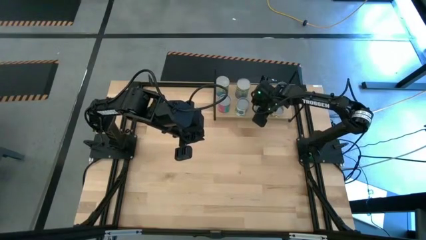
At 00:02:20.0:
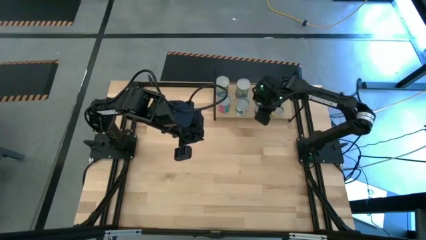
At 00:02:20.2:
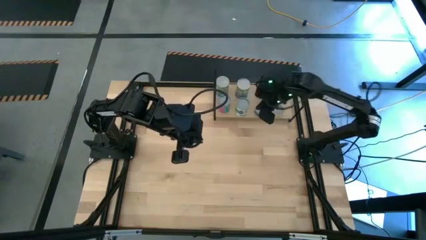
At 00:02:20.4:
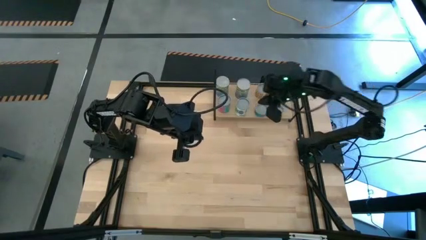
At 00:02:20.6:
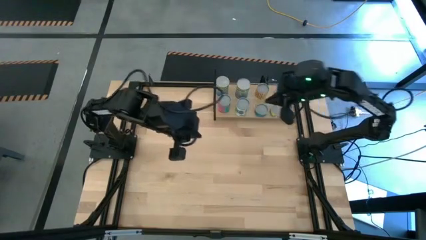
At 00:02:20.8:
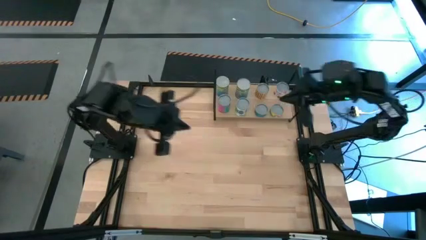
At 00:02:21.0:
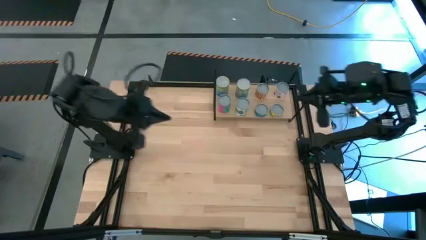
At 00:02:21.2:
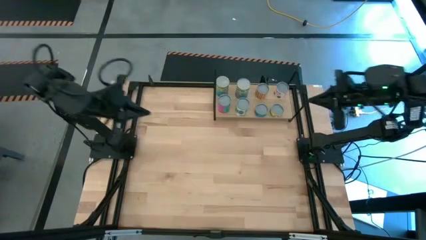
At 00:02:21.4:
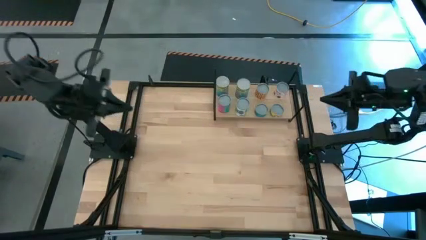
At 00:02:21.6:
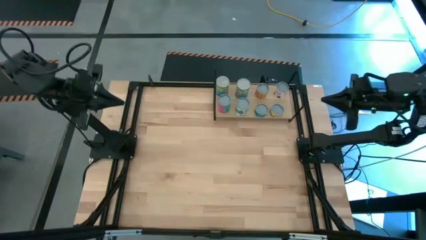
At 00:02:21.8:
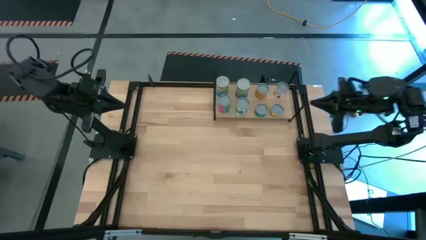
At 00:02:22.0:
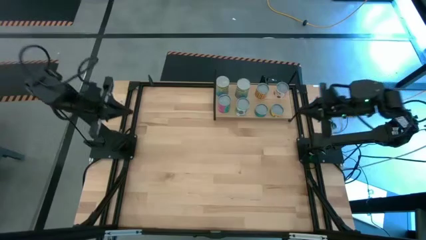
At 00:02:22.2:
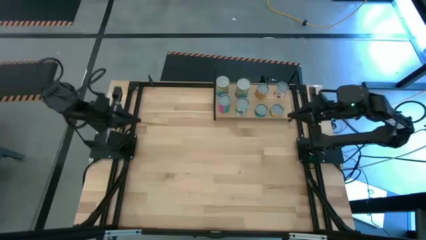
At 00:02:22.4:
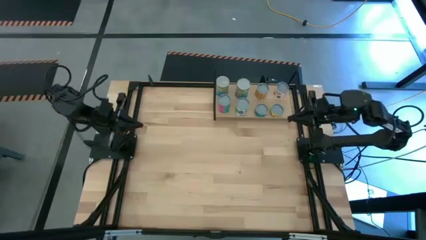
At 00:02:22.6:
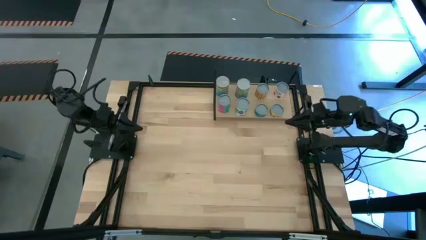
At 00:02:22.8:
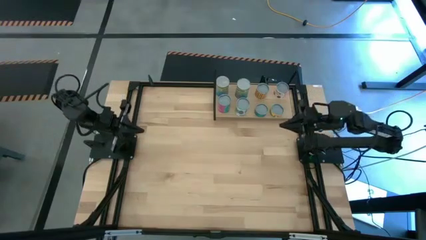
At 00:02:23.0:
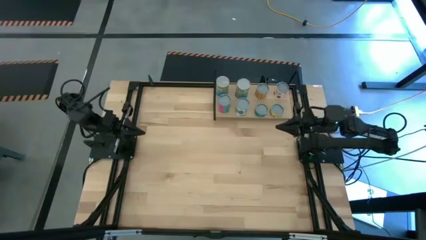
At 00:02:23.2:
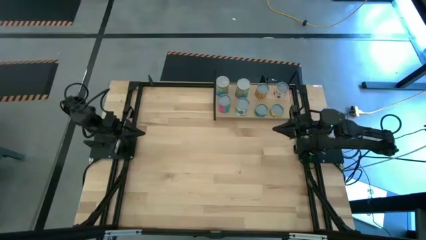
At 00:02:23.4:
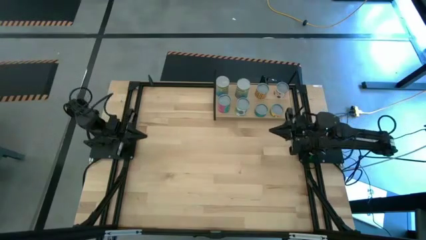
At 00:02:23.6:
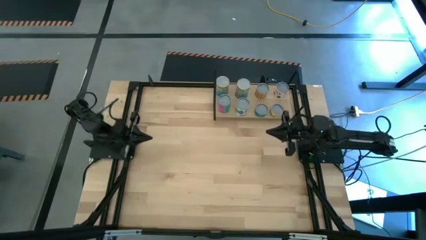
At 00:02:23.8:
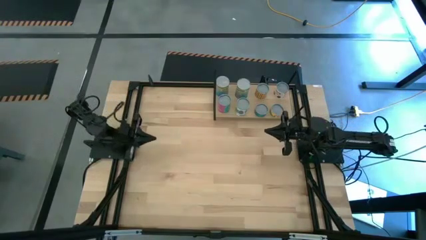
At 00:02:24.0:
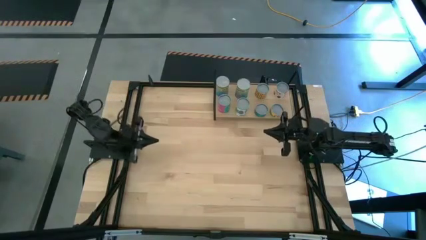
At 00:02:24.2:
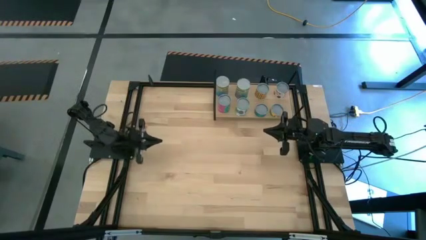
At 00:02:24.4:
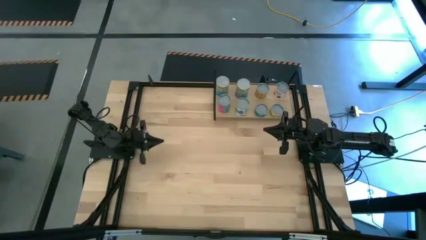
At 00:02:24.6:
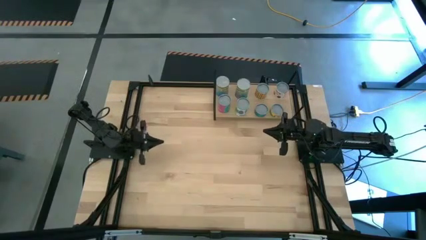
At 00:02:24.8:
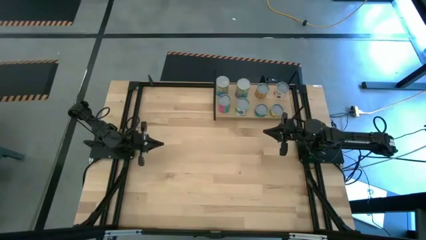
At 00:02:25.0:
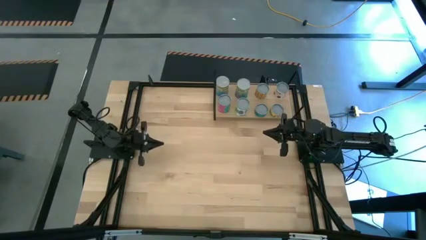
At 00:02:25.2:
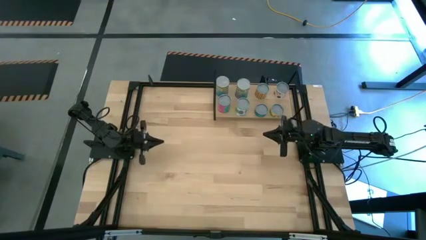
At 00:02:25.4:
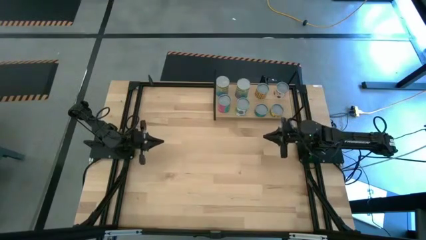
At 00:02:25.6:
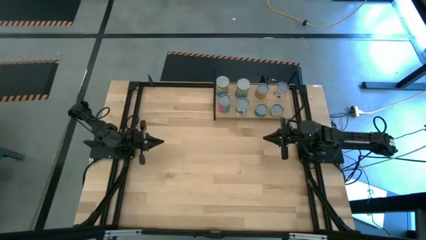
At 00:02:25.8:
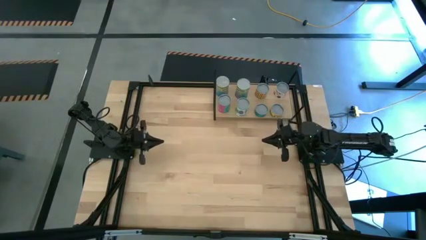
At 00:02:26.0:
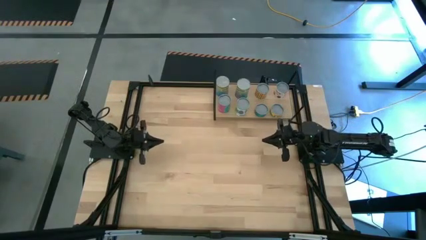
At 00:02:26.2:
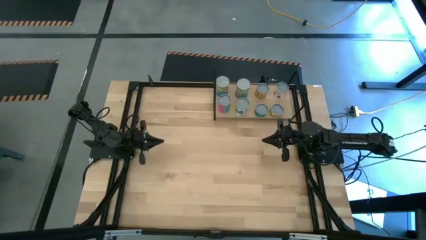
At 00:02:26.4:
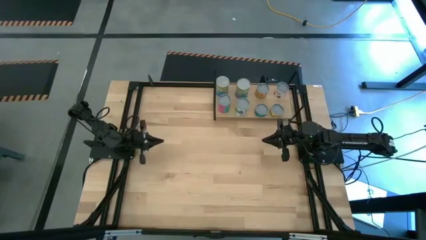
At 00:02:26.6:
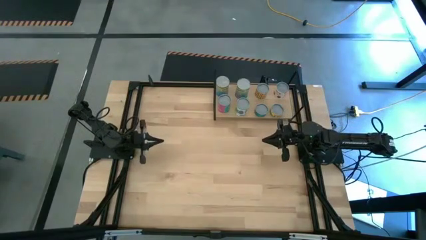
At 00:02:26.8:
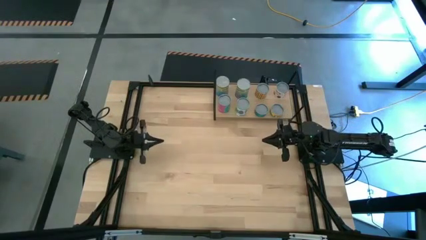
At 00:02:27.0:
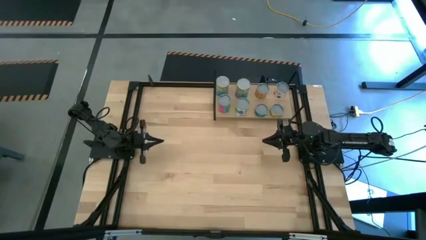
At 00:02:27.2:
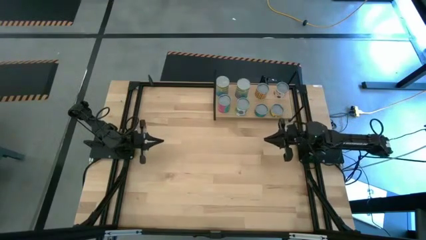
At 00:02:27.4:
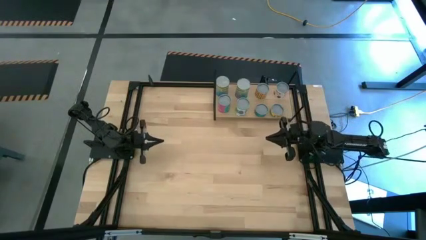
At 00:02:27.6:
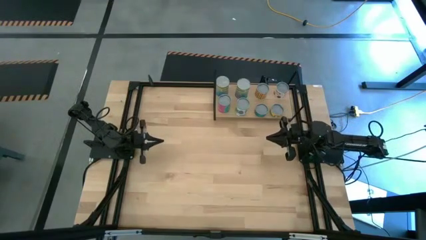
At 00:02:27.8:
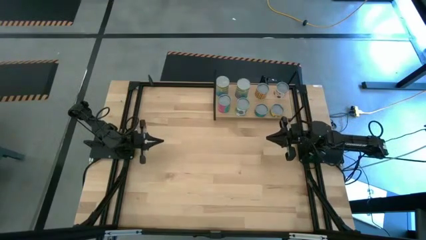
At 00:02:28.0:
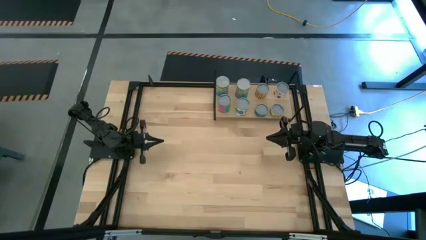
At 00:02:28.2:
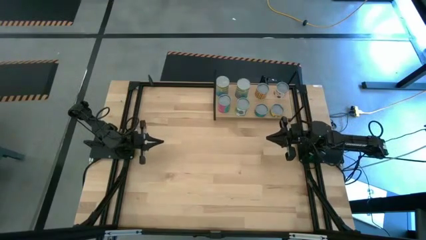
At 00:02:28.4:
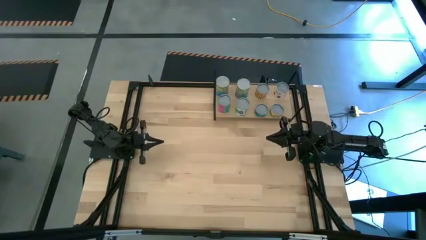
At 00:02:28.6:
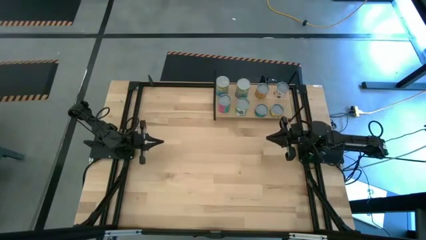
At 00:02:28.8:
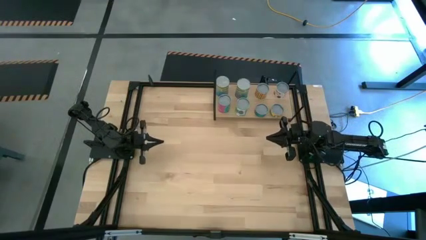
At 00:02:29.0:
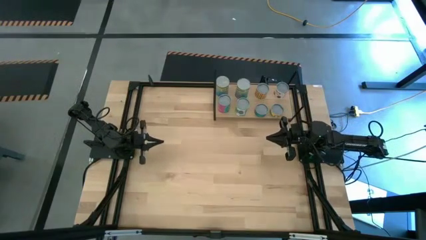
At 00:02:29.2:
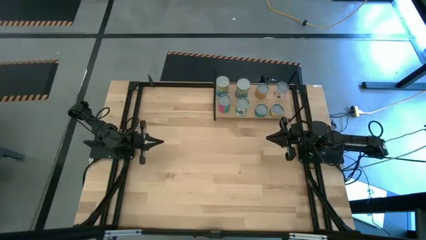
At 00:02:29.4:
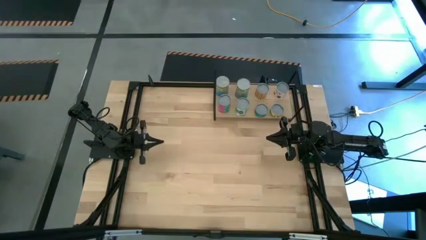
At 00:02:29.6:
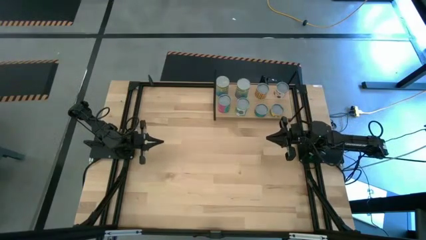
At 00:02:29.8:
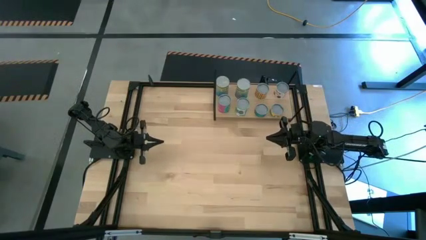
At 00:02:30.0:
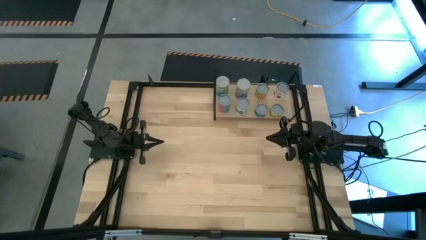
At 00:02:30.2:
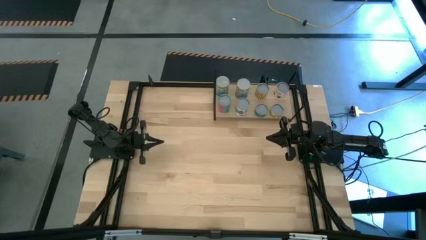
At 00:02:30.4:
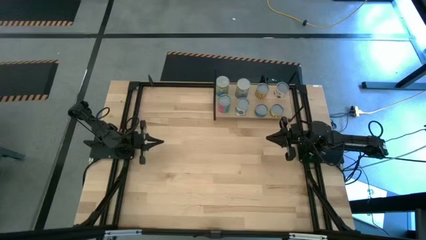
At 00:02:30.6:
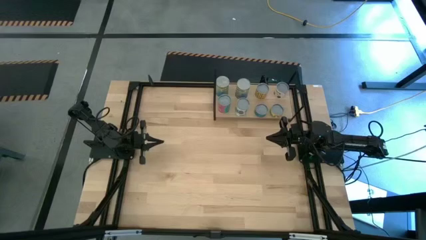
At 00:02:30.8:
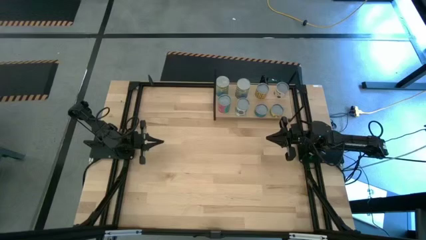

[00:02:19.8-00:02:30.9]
Task: Pick and place cans onto a shelf
Return to Home Position

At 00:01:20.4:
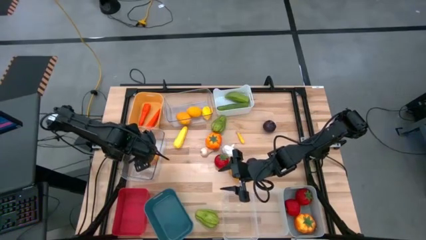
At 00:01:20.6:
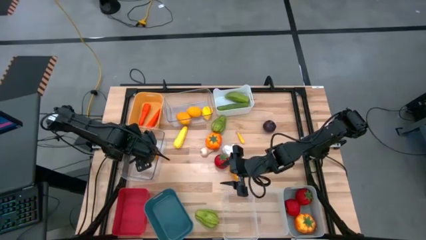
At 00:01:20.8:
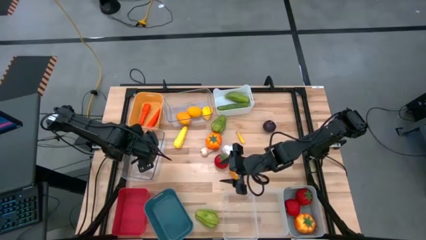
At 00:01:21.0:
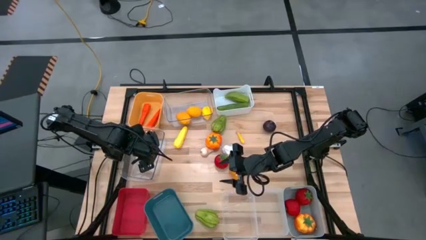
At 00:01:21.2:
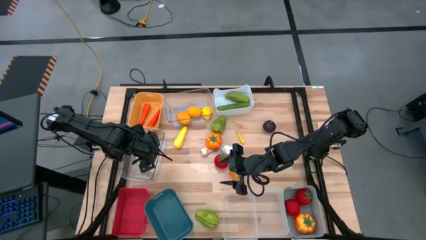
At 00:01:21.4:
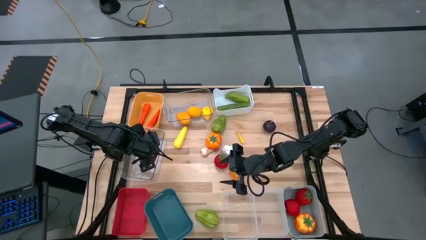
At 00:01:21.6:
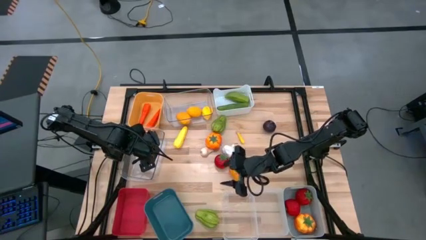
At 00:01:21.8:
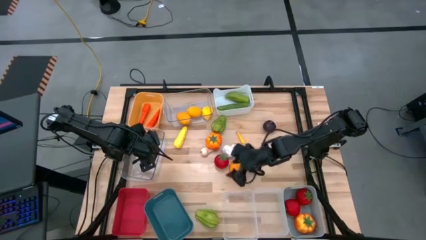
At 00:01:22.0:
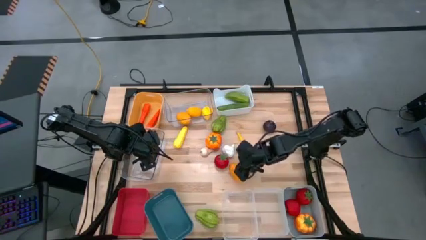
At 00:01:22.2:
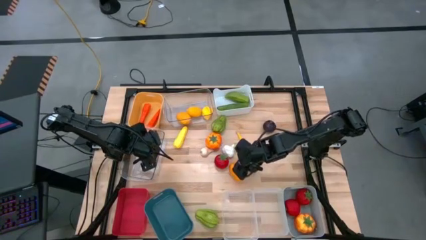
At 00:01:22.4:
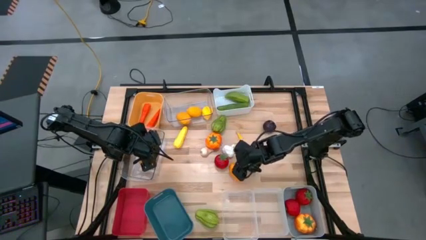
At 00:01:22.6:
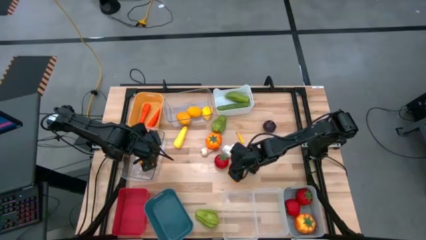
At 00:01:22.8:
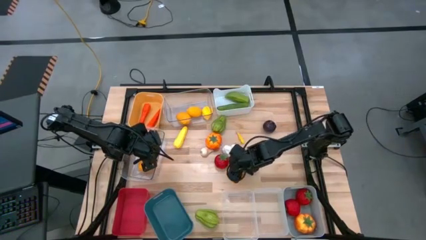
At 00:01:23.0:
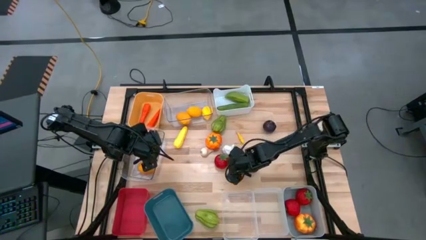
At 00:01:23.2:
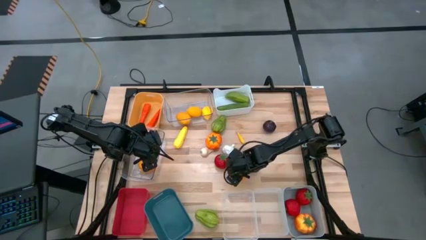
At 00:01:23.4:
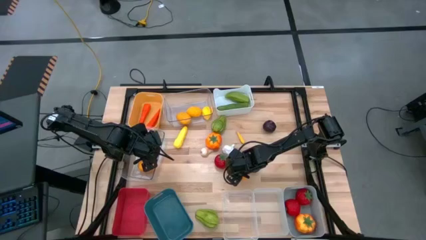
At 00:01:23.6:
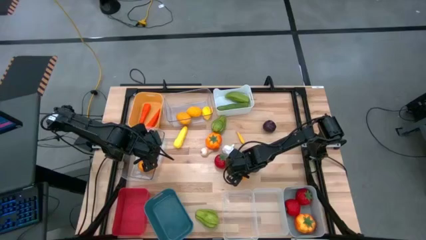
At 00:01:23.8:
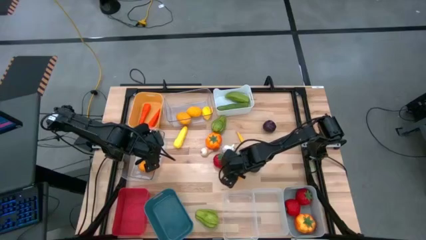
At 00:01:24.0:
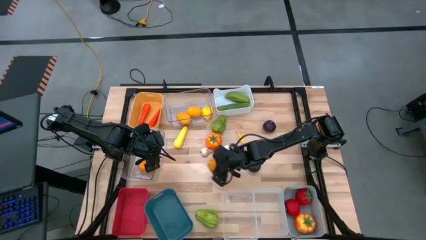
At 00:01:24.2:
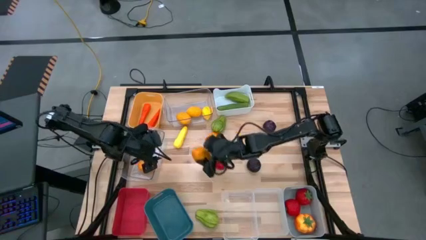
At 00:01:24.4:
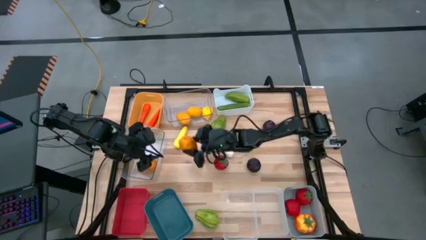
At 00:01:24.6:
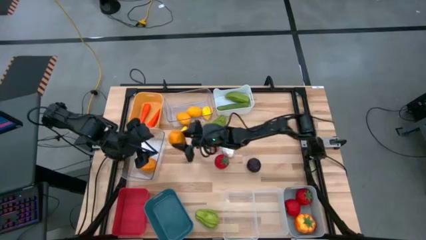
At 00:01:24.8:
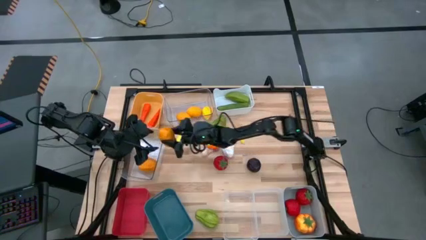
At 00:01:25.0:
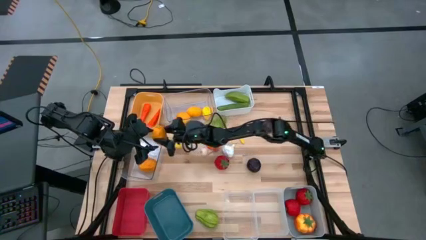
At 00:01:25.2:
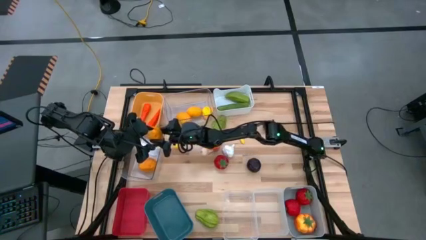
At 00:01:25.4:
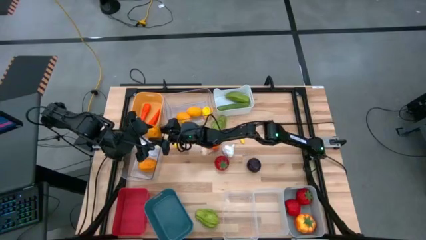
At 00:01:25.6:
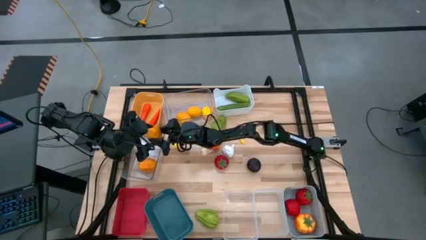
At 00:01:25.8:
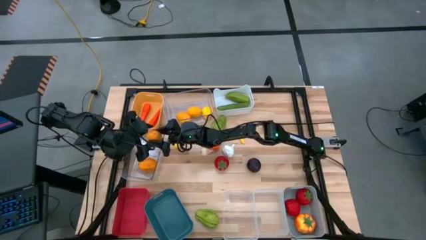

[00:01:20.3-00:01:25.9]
Task: Sort produce into baskets
Put the brown potato into the middle transparent bin
